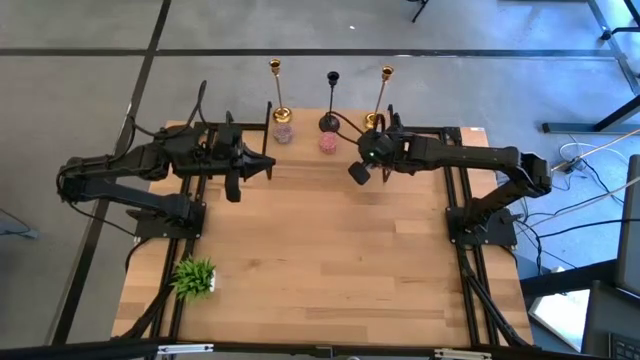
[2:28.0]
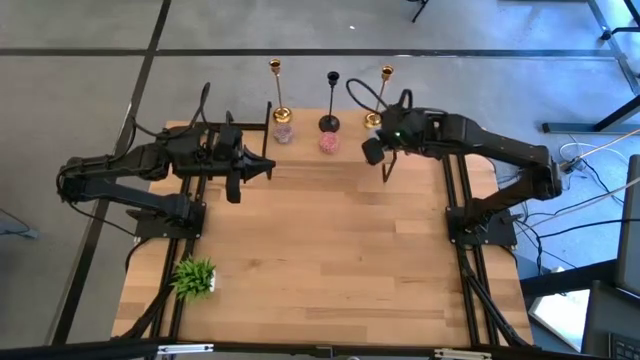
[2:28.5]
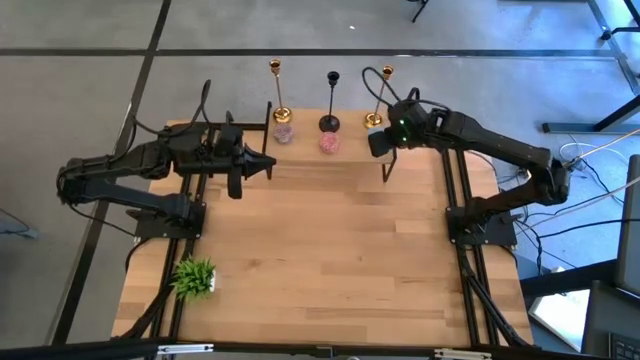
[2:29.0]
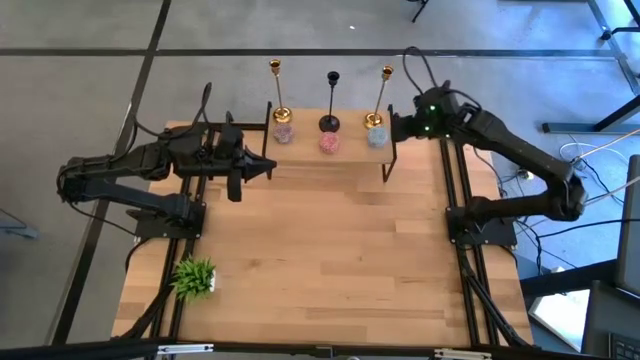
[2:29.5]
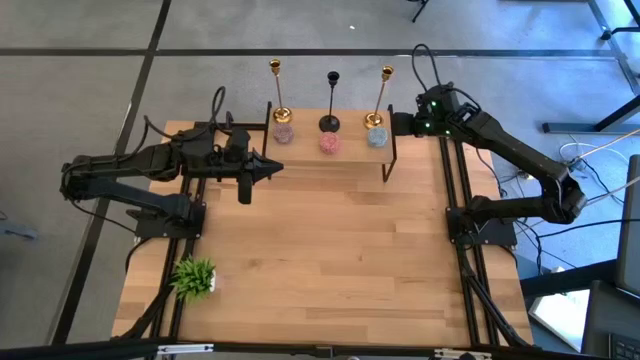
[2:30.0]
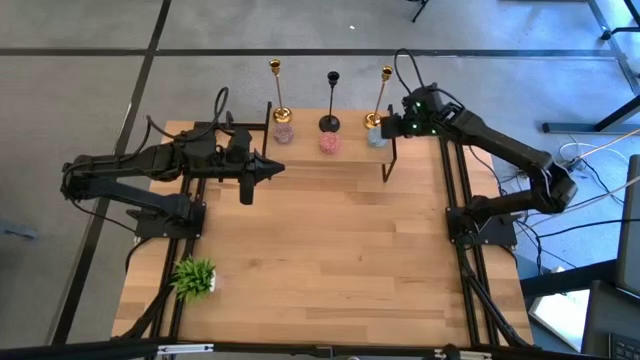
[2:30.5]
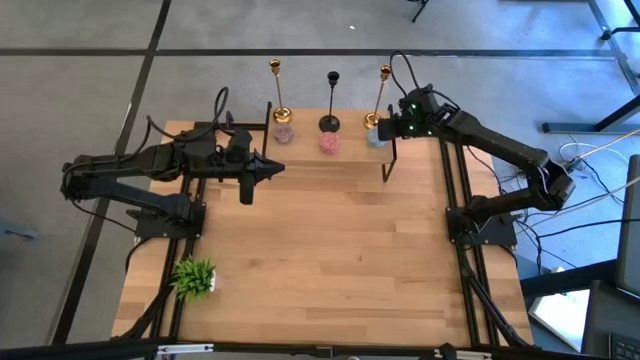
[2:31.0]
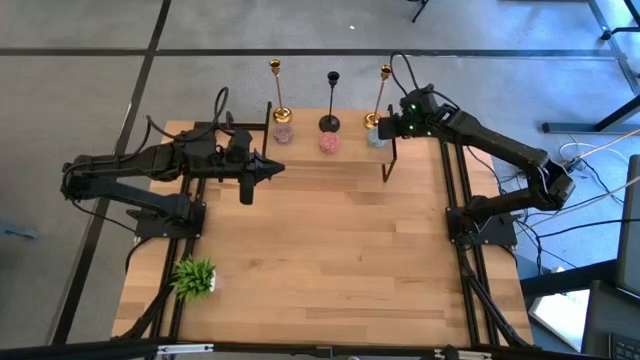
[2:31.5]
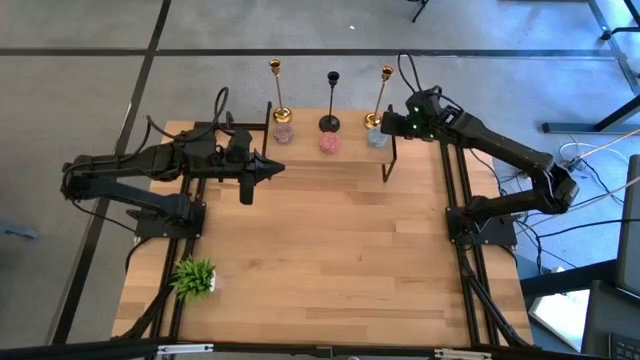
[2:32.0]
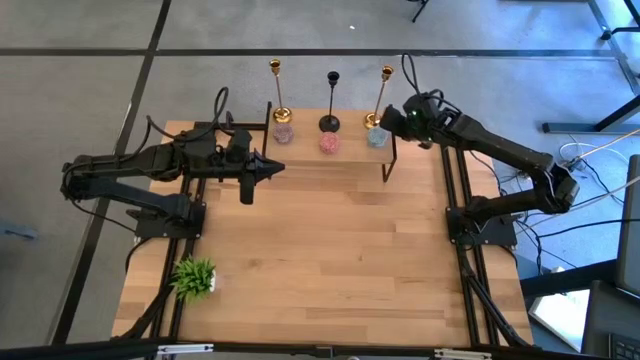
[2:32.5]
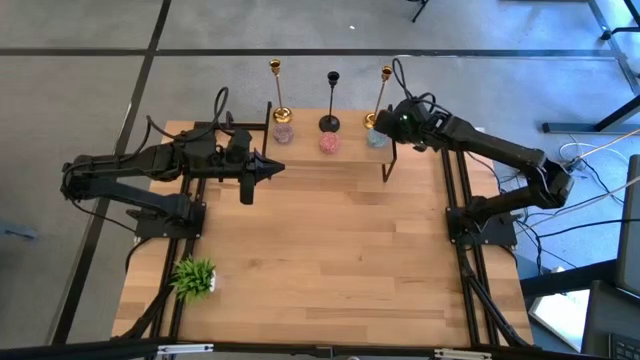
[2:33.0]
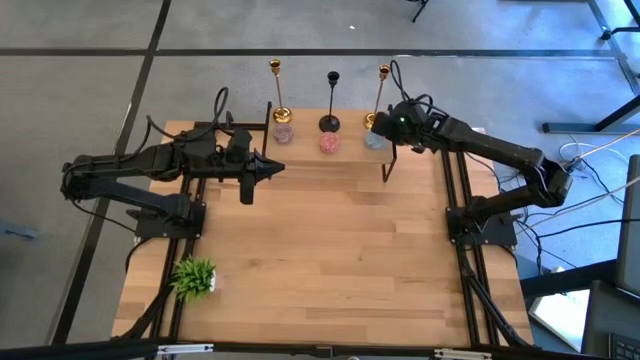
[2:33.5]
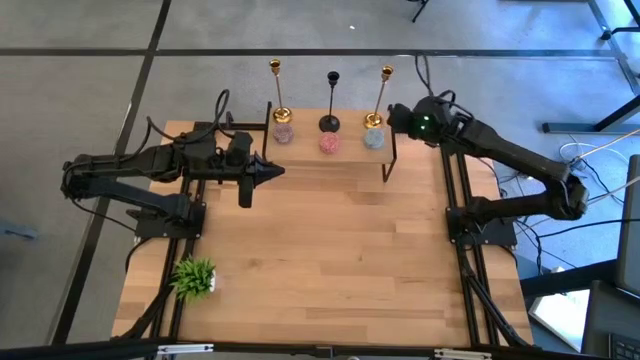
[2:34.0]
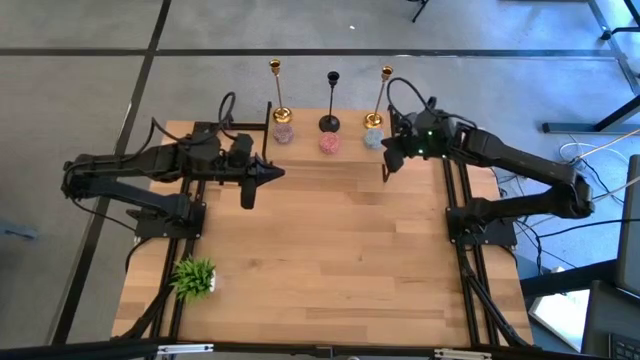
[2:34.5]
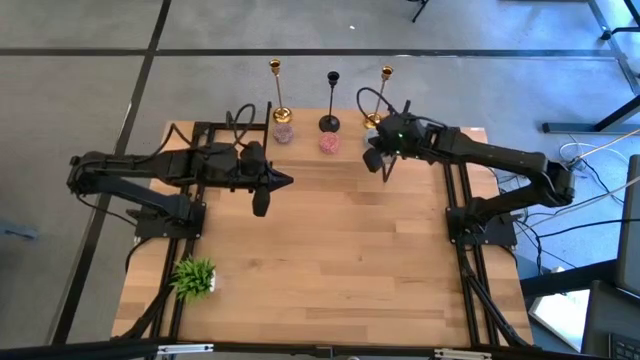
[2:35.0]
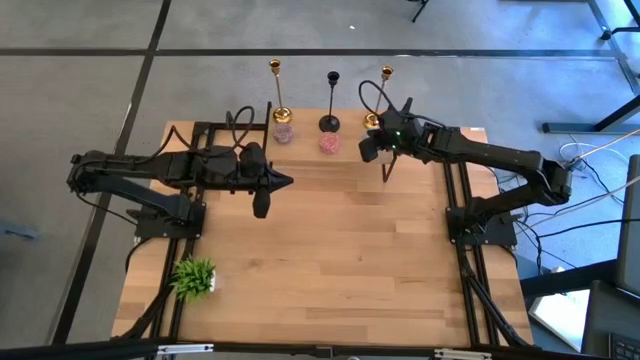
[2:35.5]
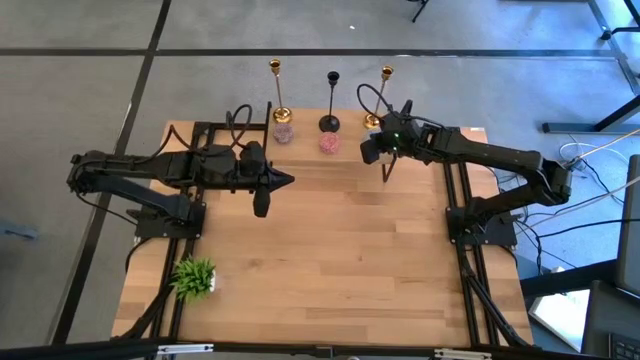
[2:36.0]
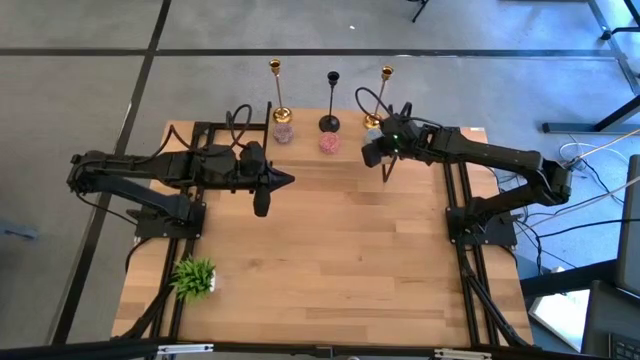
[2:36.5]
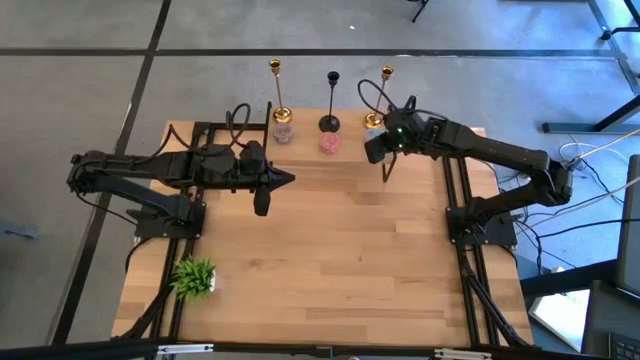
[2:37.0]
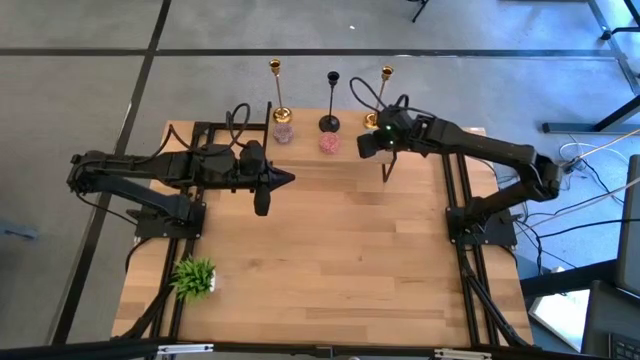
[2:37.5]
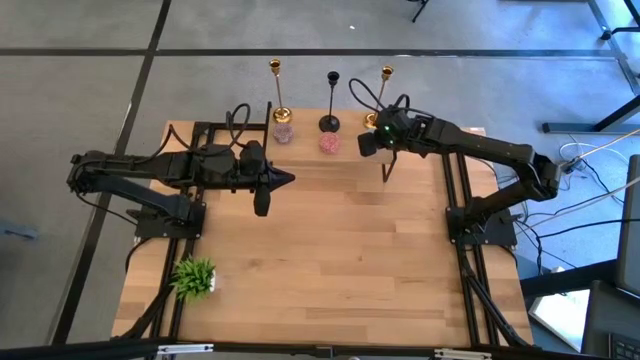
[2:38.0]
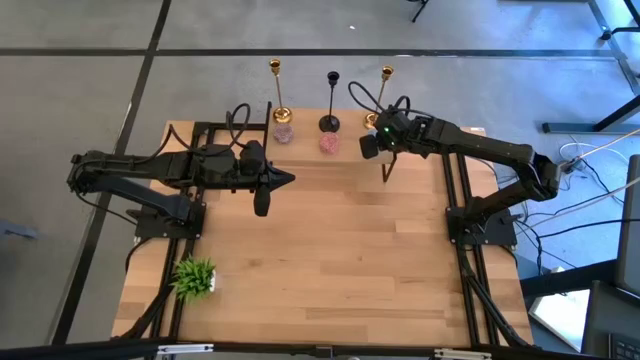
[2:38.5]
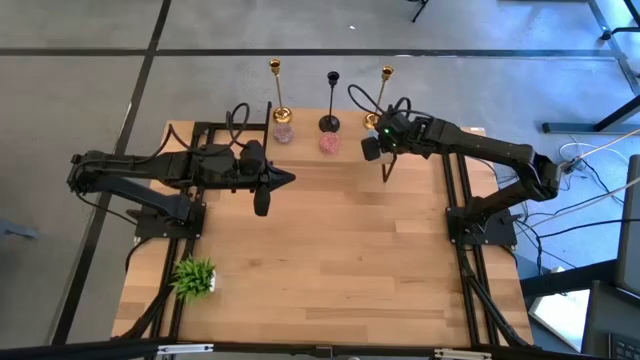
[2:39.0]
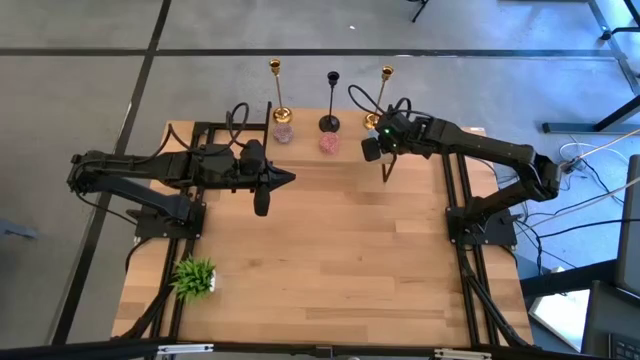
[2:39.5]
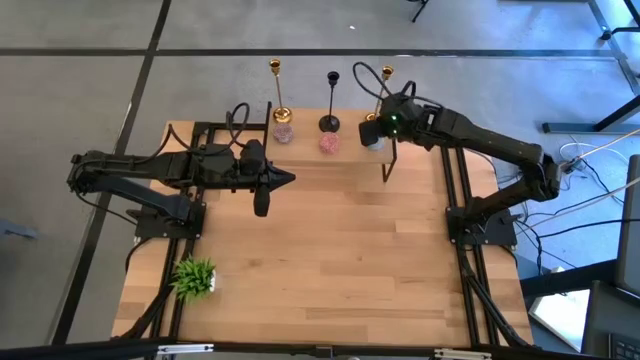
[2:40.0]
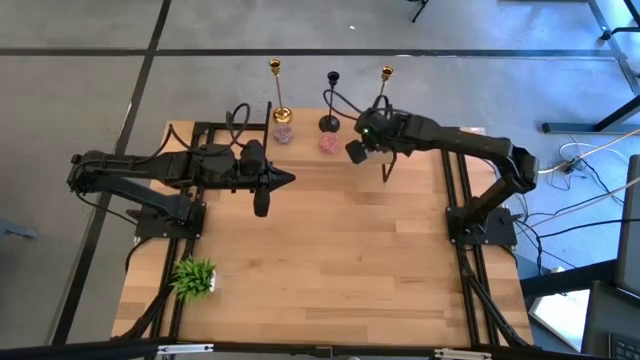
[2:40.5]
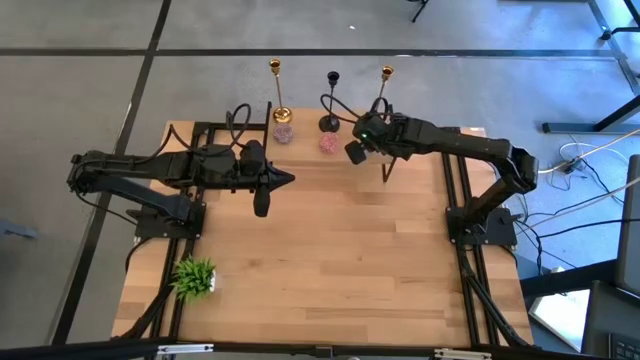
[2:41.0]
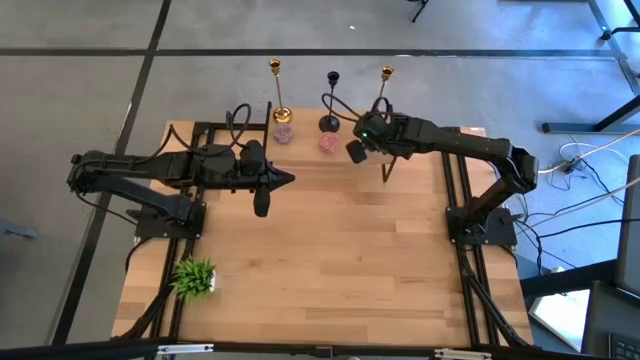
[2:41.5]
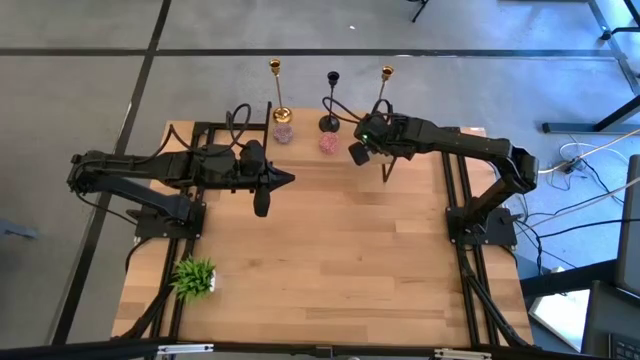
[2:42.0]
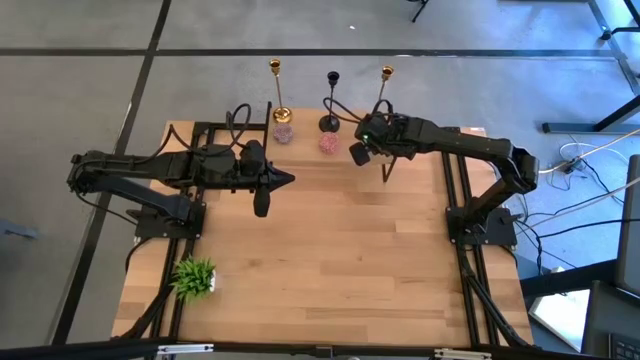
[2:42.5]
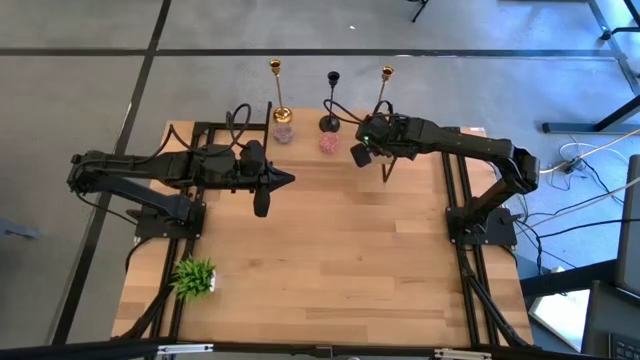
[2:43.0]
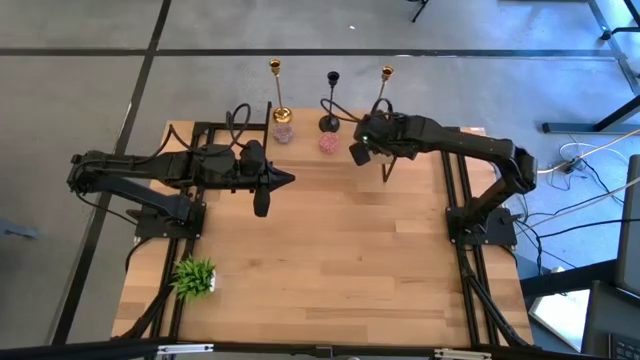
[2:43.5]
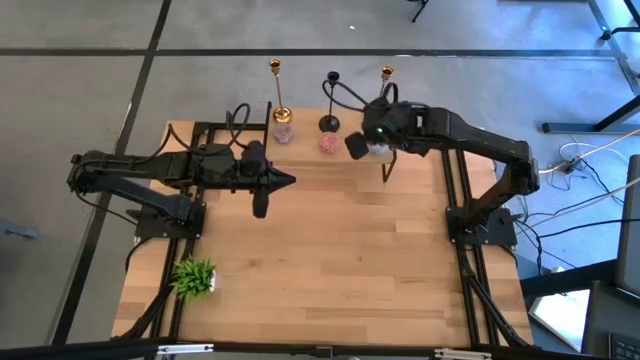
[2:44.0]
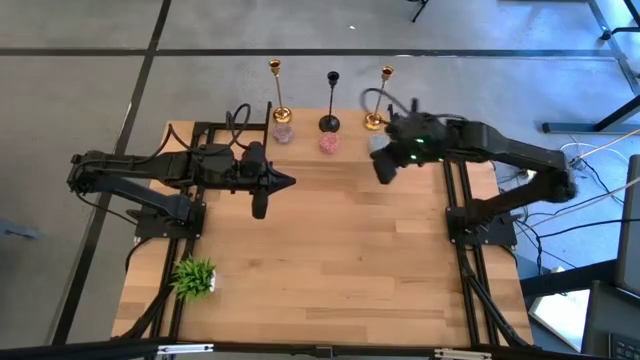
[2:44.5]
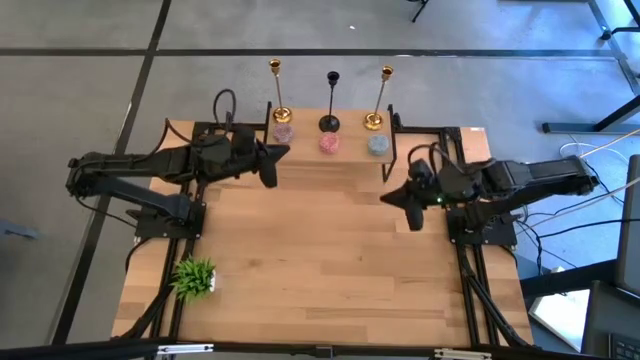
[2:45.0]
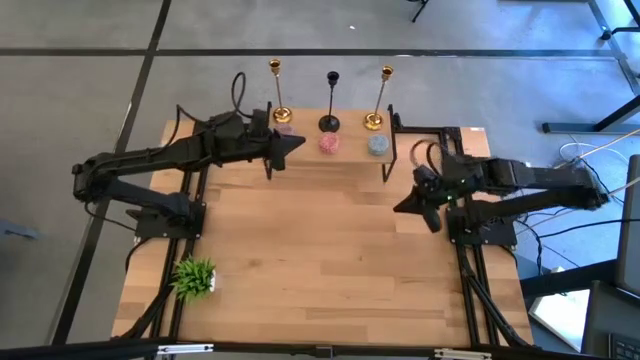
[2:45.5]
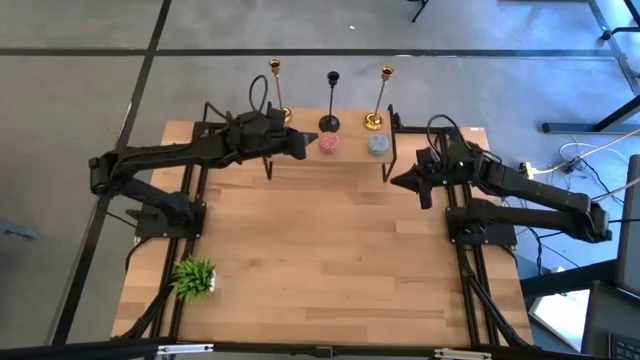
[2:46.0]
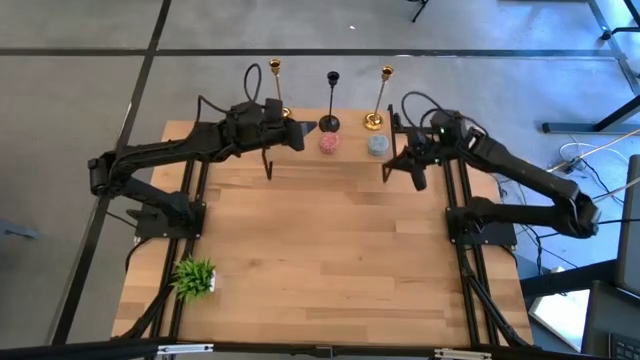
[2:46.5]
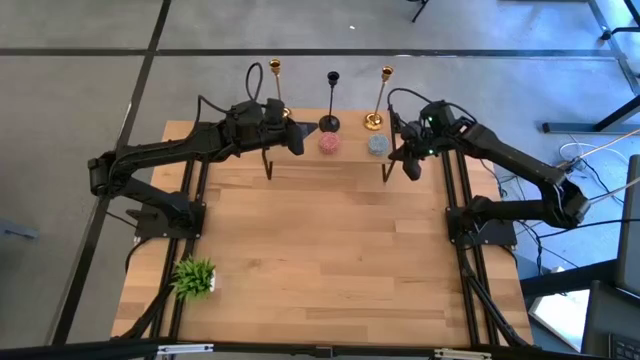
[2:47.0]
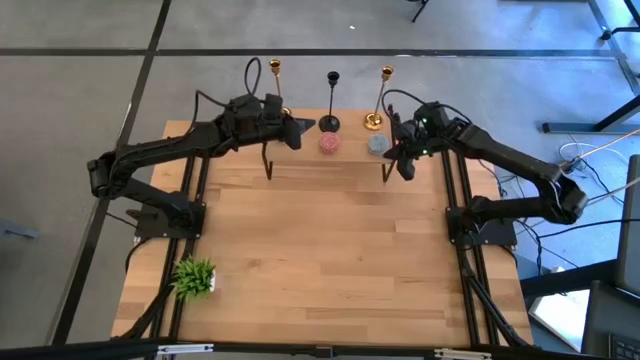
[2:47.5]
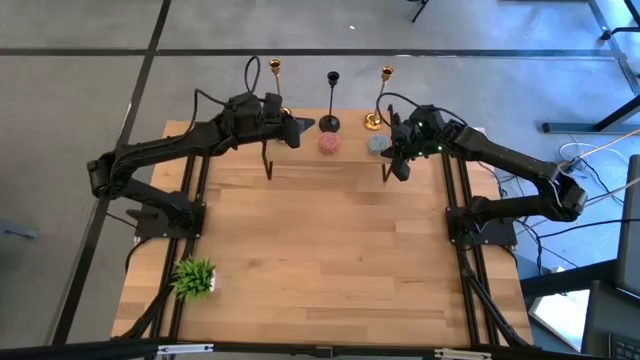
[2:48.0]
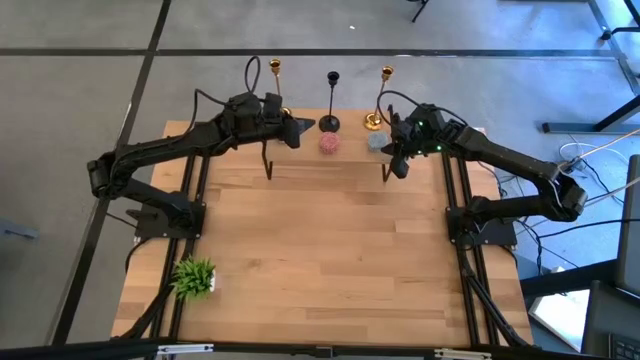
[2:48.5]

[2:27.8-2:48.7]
Task: Pick & Place candle stick holders
Put the blue scented candle on the shelf
